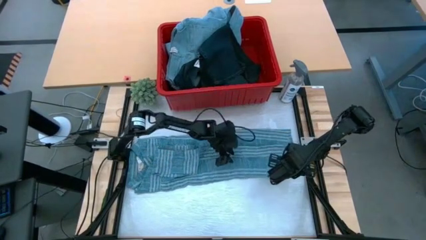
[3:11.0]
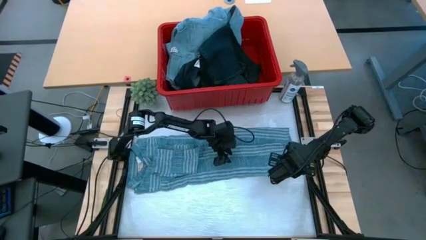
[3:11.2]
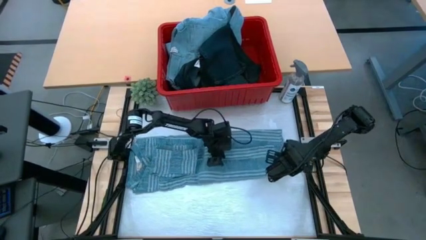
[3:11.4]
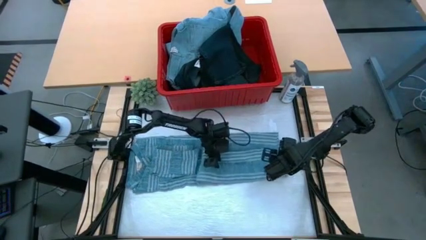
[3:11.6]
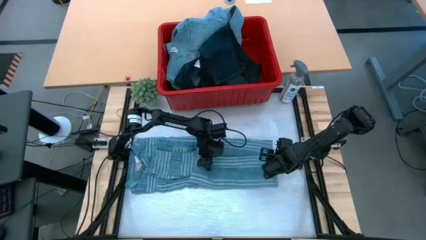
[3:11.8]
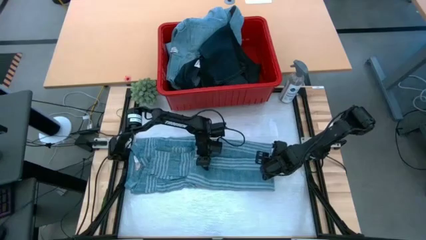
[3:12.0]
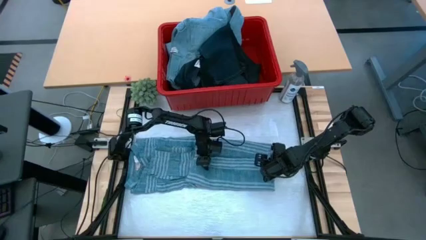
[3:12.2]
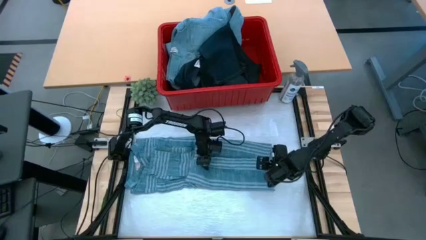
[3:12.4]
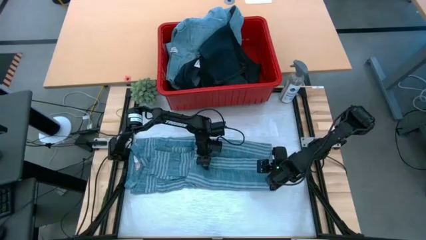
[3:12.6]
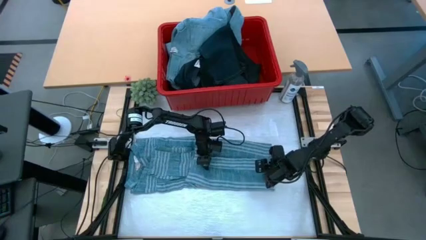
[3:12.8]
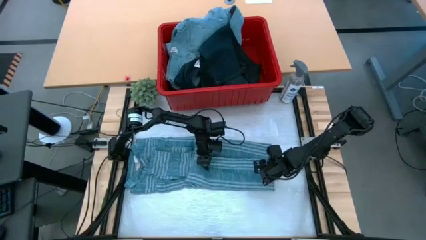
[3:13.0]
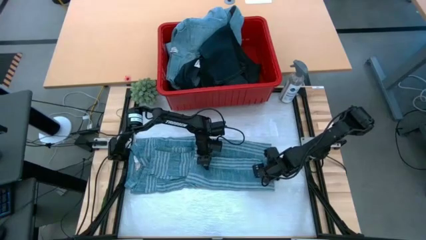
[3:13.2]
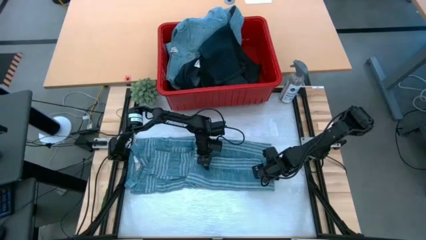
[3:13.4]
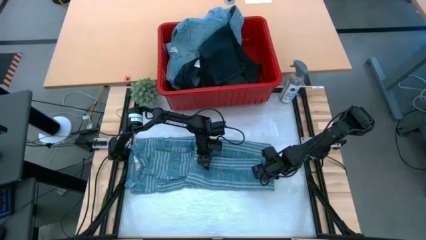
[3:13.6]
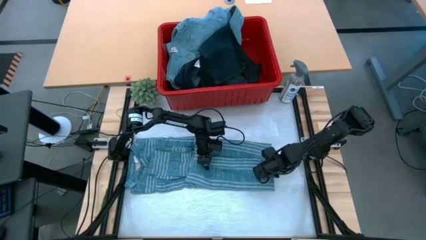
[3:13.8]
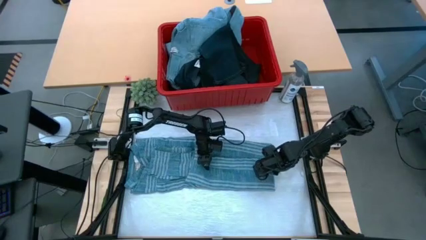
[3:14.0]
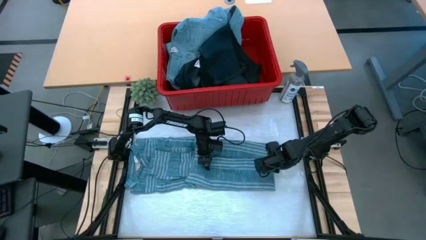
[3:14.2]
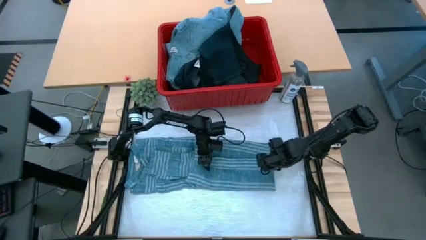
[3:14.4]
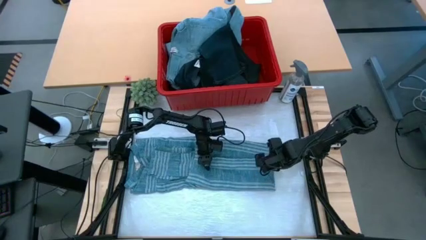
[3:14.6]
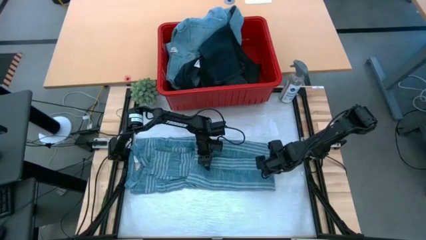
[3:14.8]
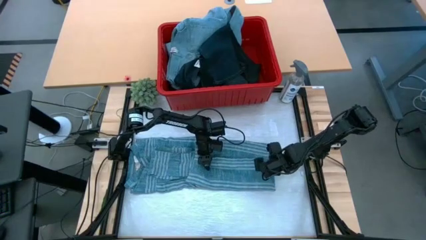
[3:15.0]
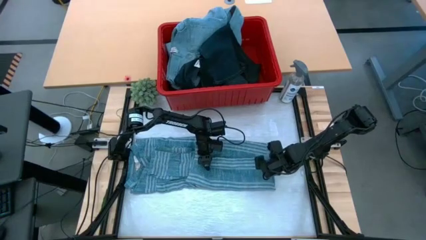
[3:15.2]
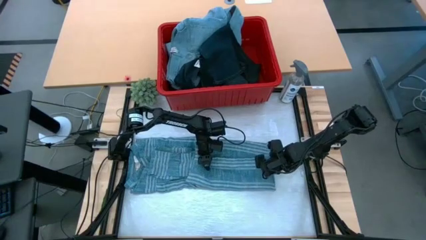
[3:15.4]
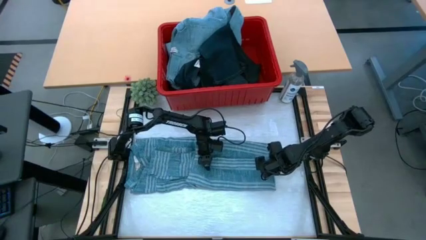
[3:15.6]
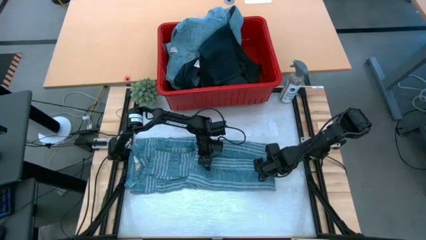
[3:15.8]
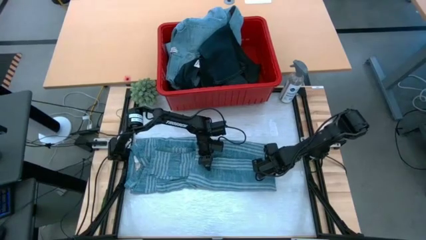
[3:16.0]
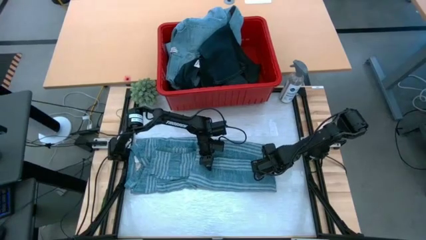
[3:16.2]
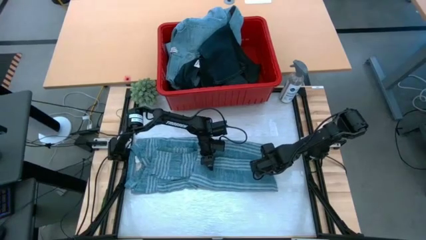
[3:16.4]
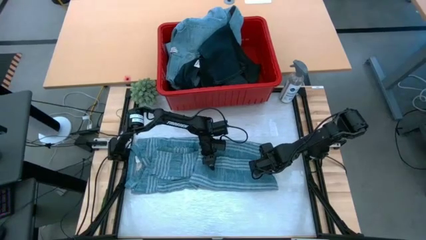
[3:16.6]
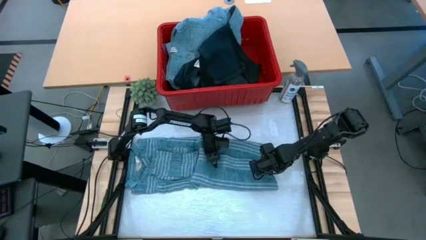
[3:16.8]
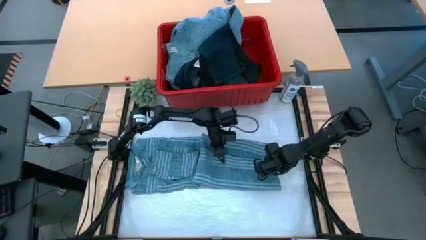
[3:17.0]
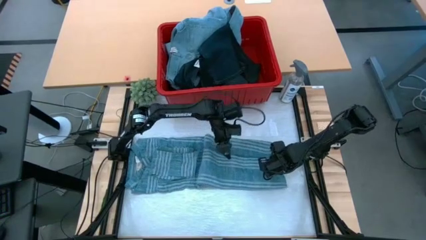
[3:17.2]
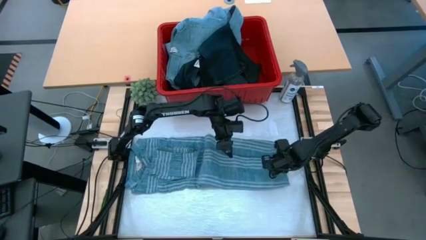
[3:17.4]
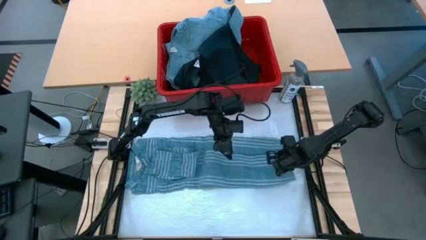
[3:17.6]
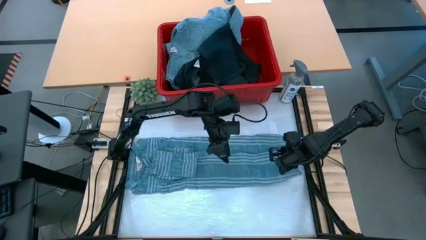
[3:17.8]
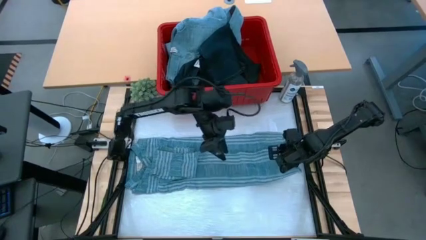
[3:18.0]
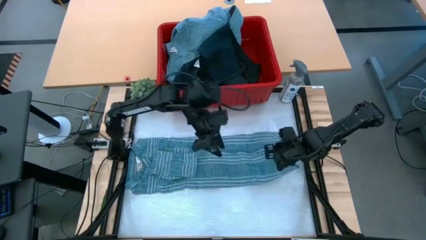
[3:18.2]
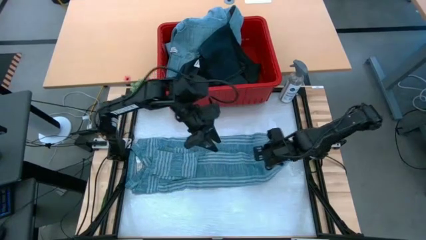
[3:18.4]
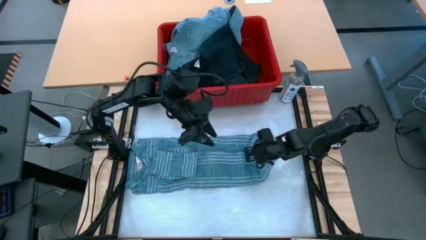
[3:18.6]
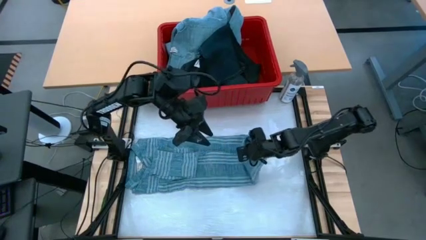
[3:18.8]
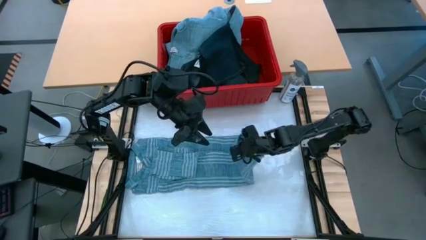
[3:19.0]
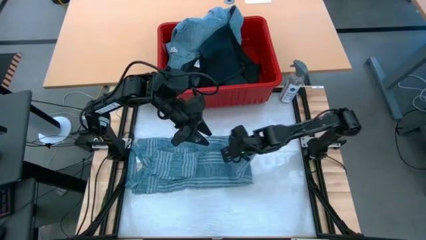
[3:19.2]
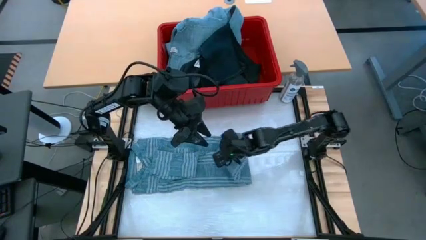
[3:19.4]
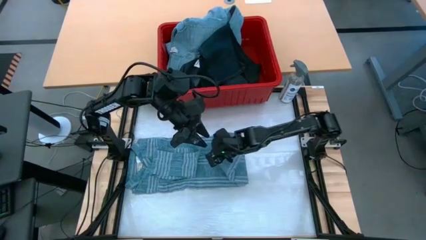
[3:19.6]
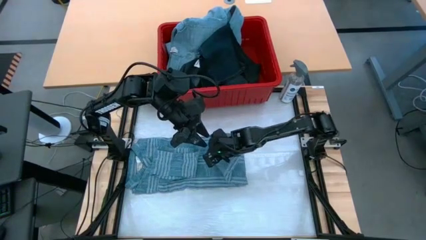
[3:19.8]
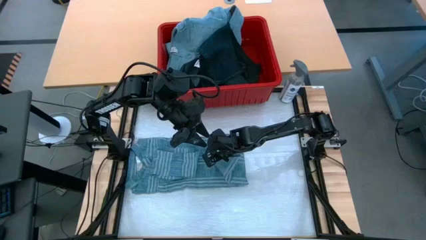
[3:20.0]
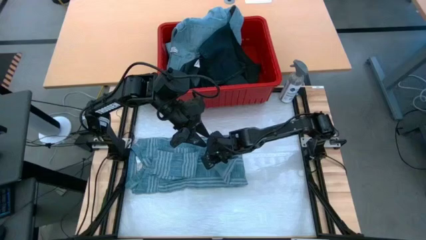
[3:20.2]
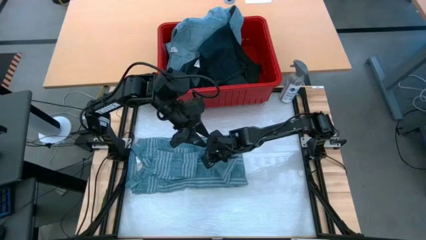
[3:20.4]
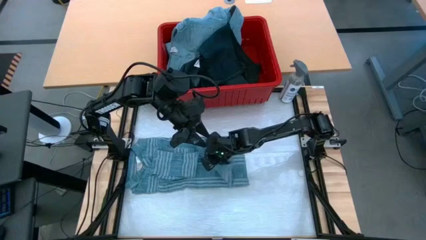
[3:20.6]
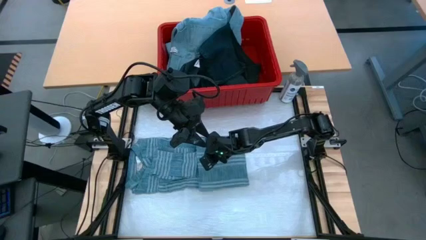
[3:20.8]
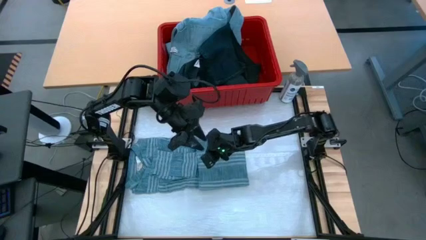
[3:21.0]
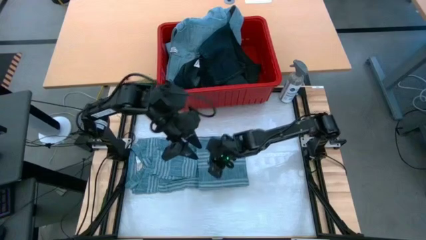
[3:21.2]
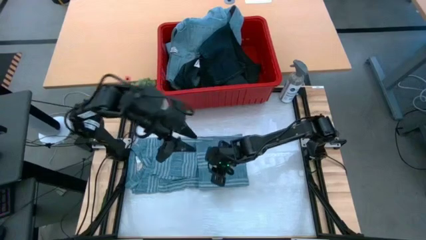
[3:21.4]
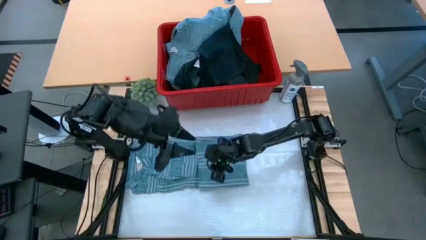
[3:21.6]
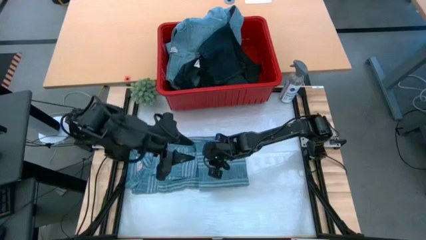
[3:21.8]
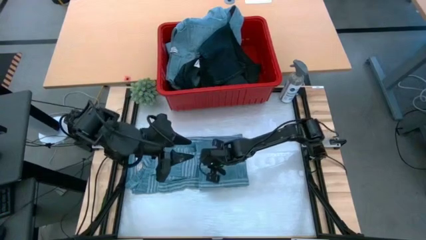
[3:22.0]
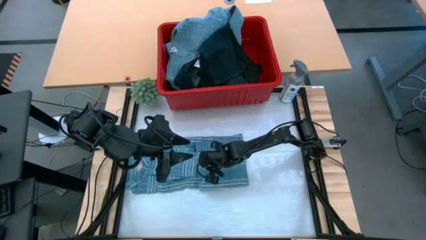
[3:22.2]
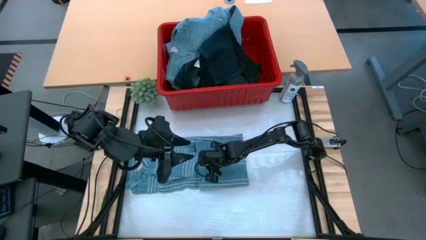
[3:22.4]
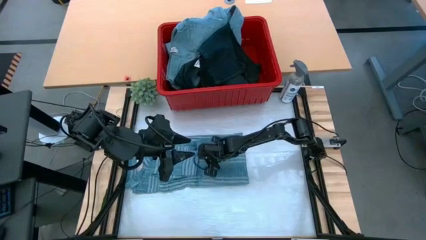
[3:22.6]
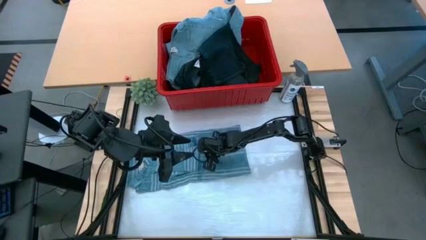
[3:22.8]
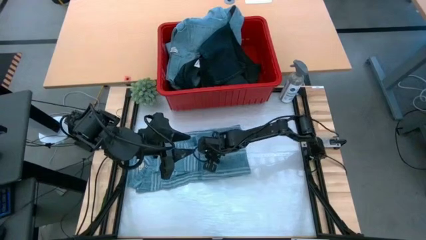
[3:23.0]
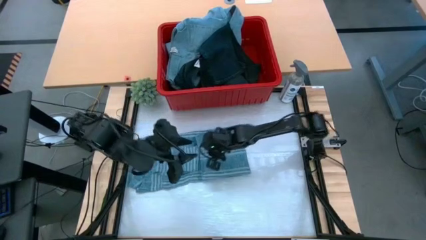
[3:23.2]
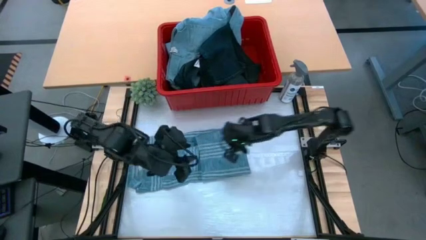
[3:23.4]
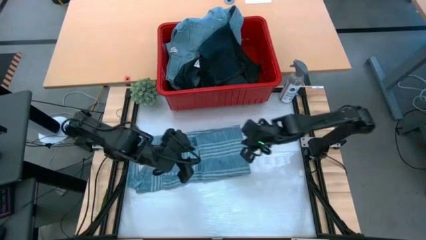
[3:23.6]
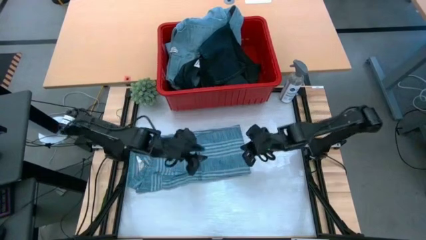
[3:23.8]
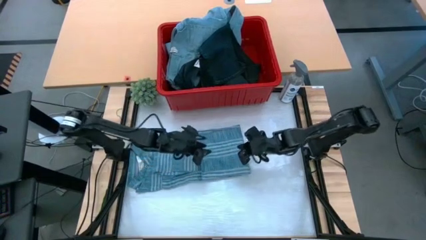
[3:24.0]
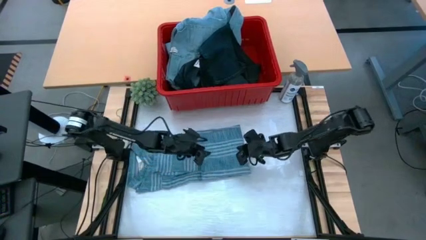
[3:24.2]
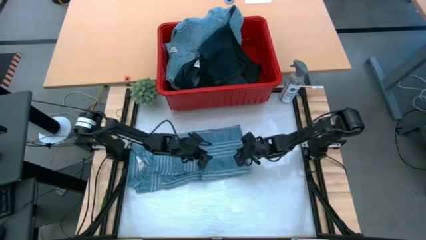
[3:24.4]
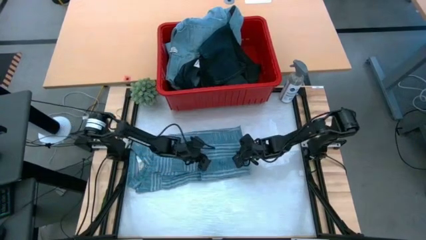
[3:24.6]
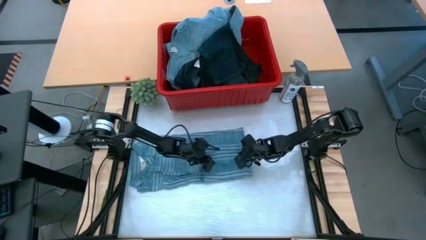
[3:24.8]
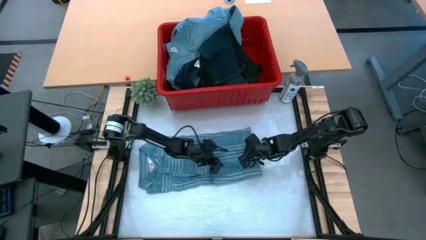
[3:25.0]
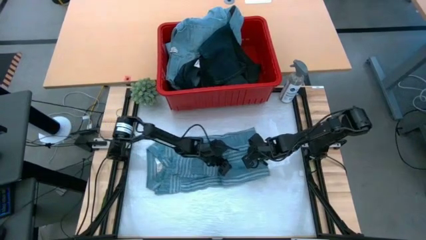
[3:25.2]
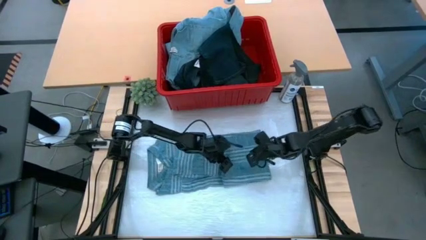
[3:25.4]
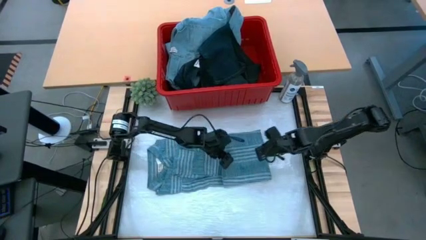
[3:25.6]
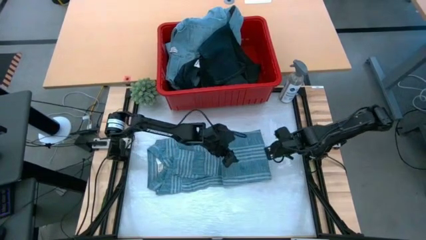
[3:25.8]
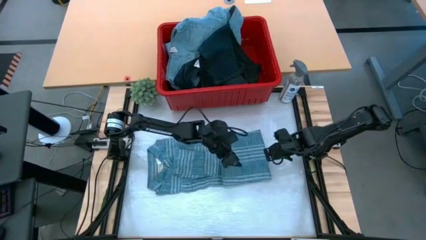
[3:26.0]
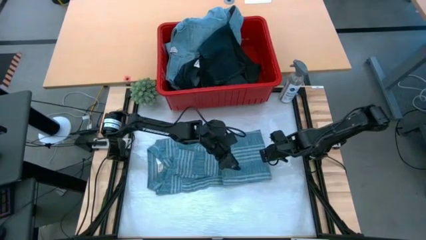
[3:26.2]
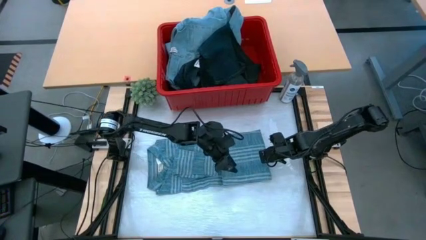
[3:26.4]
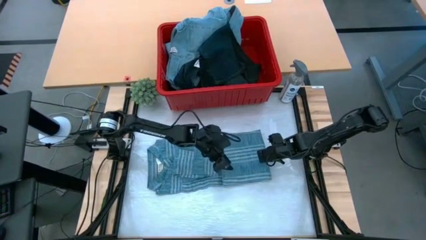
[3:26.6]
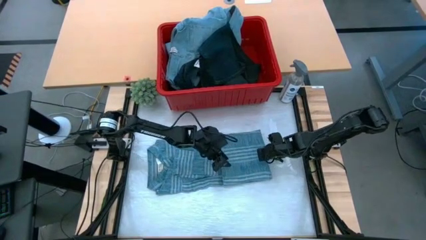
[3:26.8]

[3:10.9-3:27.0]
Task: Fold Laundry from Bin
Fold the blue polo shirt
